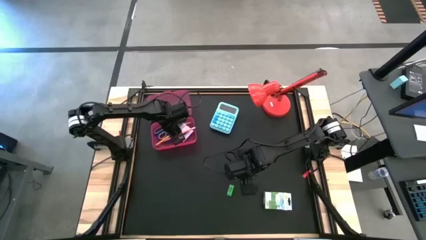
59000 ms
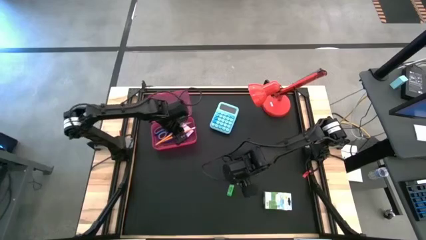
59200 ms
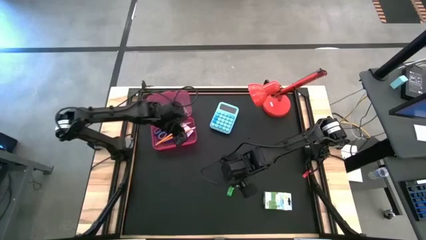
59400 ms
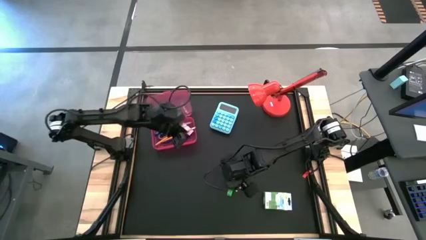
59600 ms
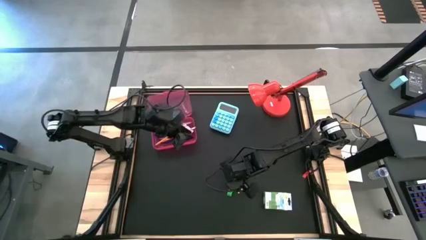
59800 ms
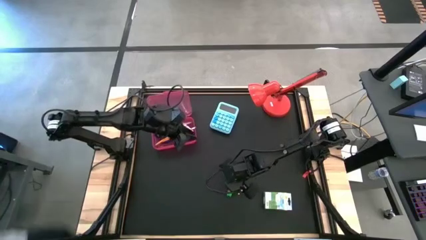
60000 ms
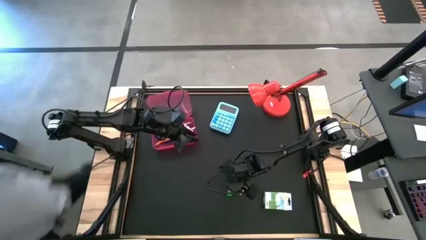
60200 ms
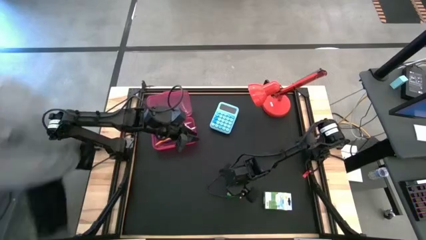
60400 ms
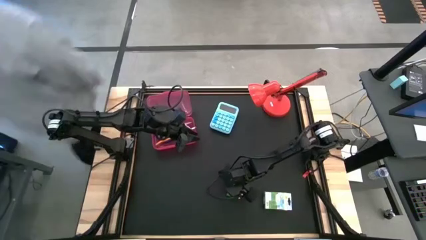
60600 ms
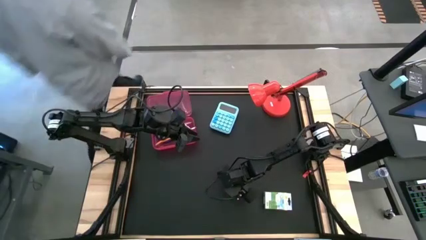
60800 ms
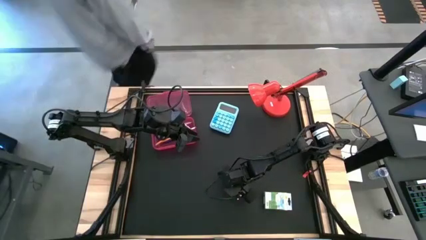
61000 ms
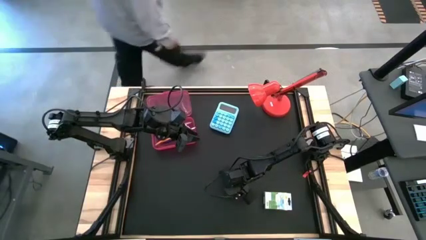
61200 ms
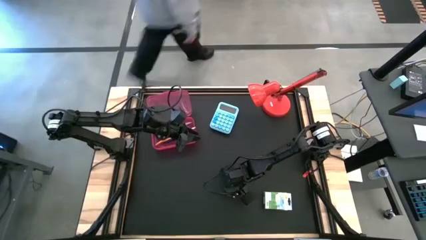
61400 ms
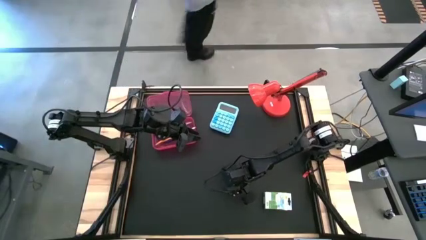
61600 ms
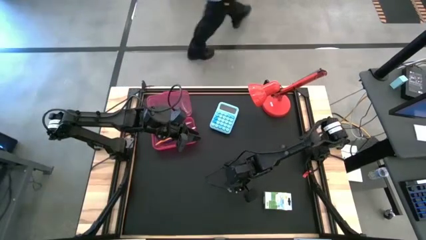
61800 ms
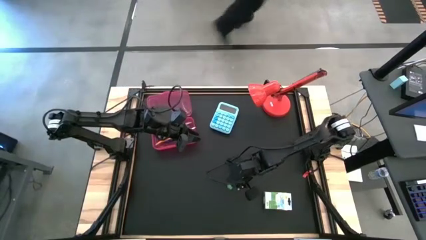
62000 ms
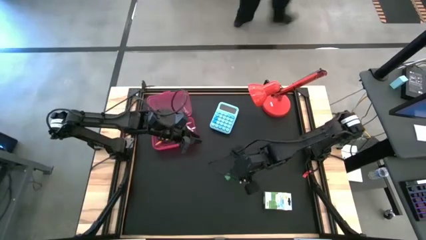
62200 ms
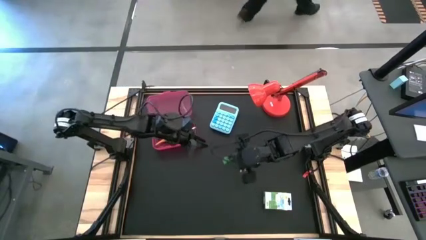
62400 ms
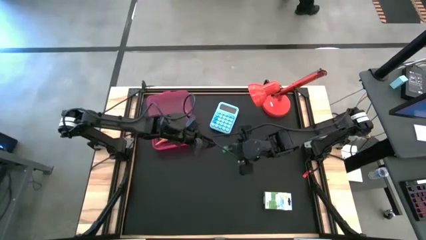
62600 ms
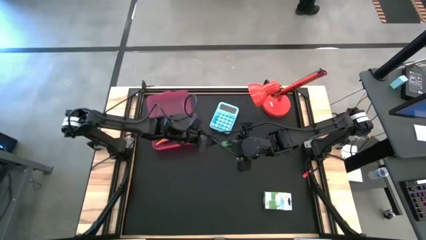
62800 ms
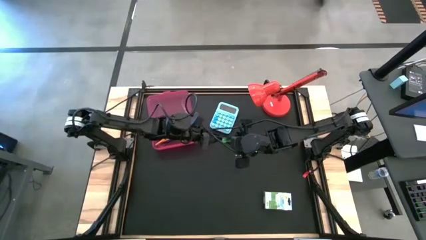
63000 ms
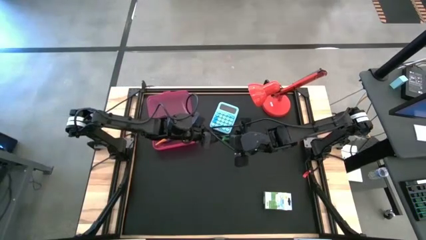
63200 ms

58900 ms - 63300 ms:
Task: Pack school essentials
Put the green eraser into the pink supply box

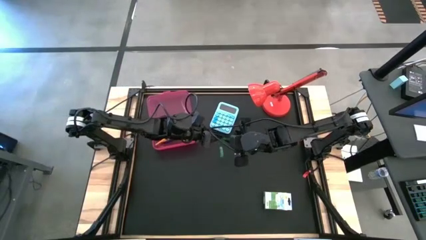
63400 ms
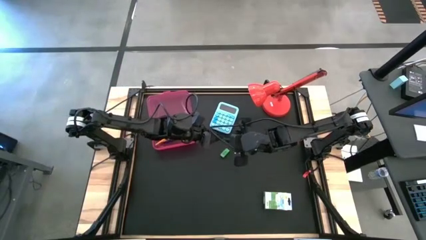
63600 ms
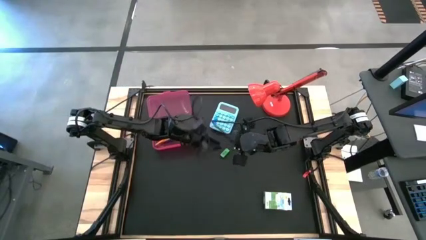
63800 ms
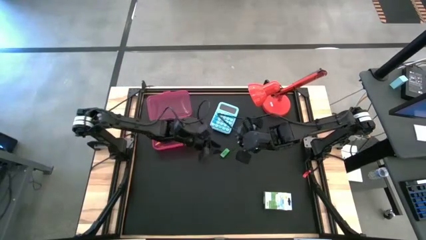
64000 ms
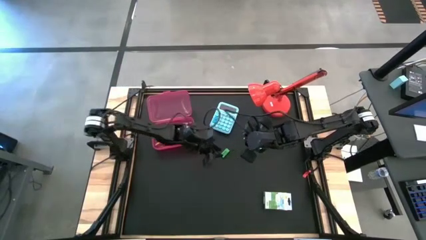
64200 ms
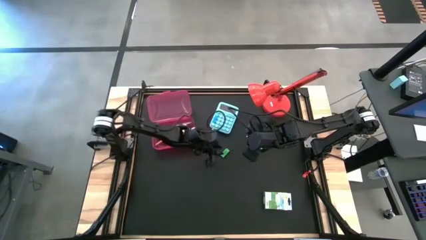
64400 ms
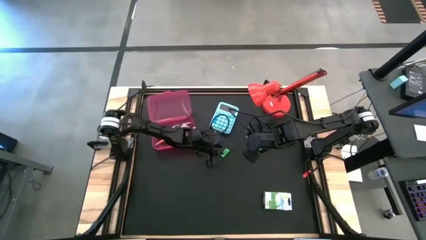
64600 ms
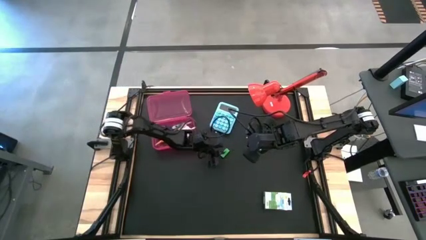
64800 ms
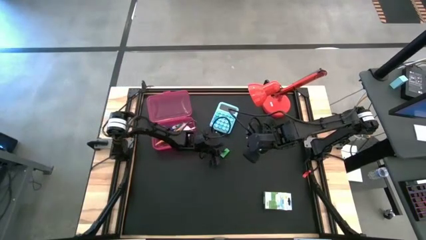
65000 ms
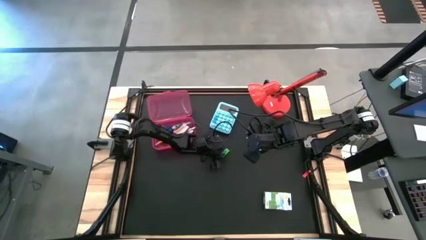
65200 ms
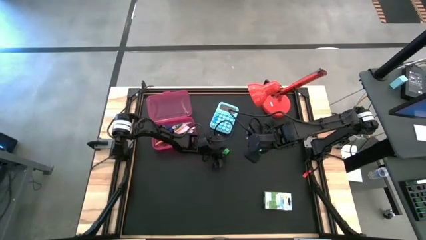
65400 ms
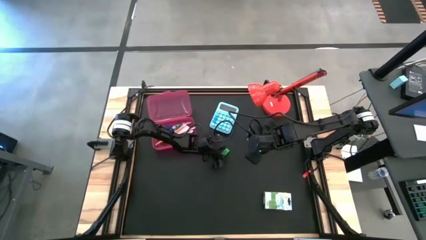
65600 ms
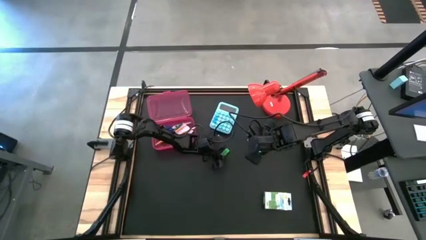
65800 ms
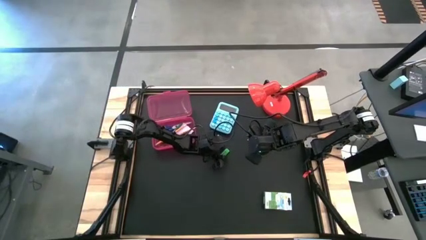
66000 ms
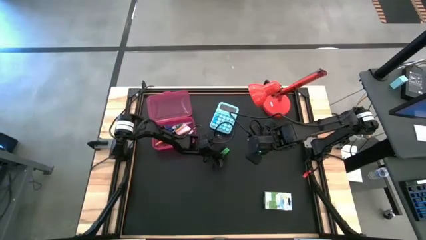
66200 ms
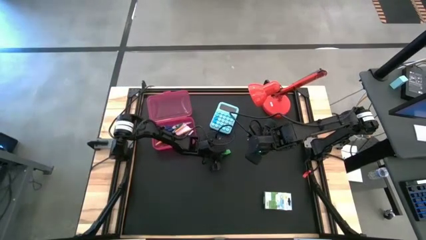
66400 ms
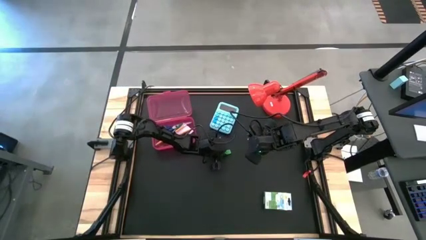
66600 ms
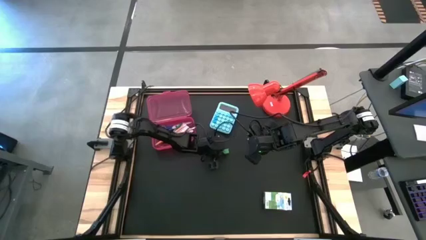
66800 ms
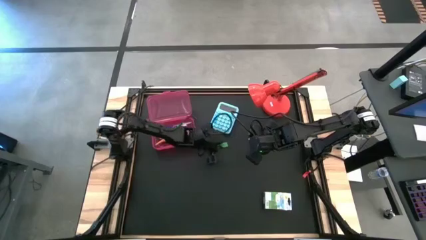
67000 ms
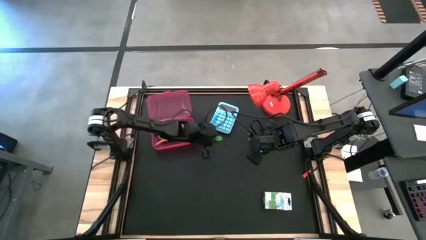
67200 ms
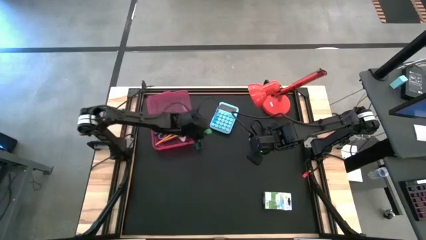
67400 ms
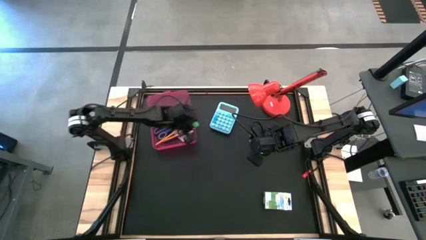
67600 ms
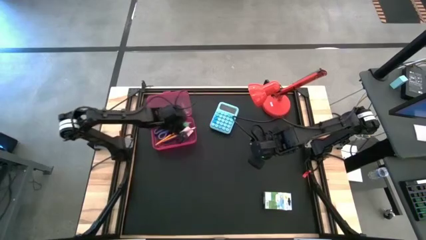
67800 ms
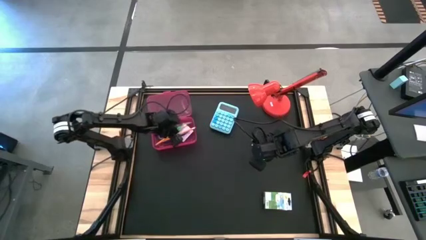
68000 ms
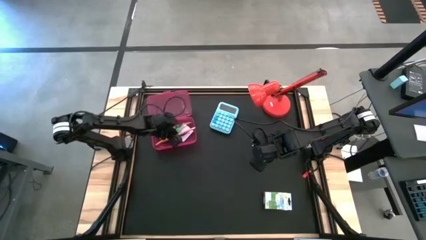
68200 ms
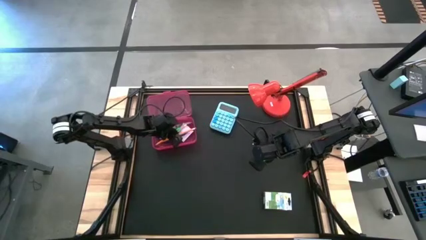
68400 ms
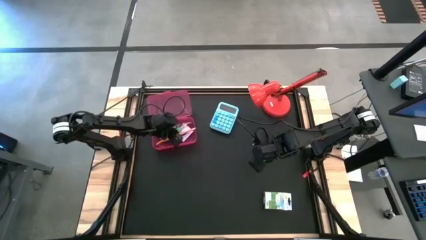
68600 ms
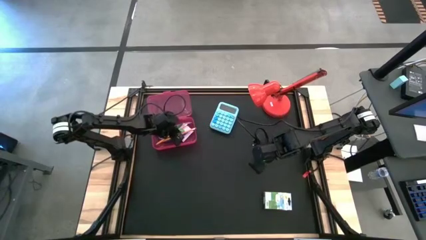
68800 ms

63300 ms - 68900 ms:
Put the green eraser into the pink supply box

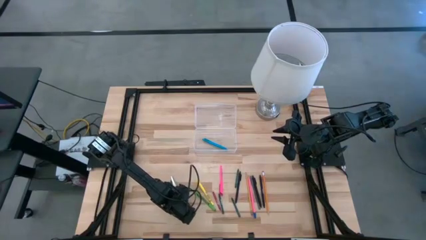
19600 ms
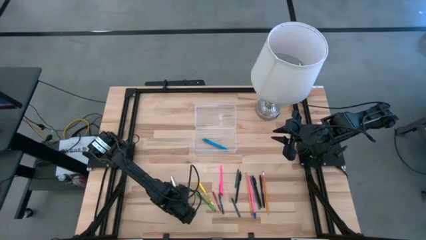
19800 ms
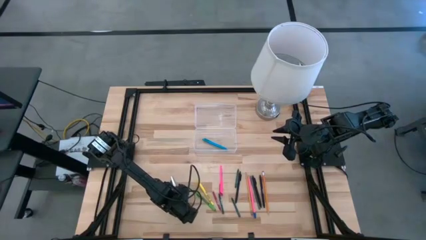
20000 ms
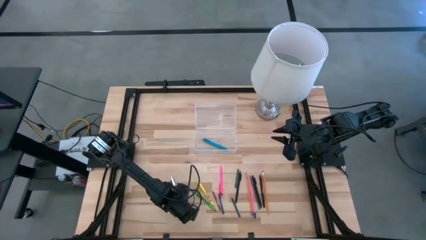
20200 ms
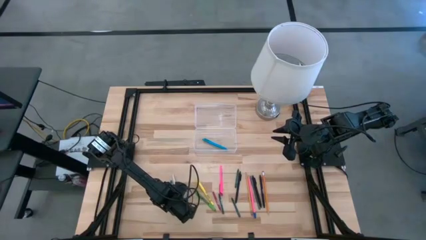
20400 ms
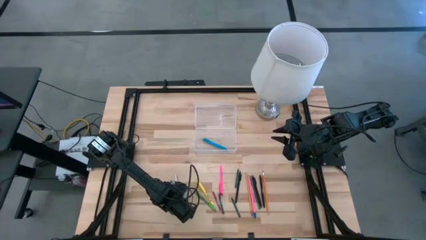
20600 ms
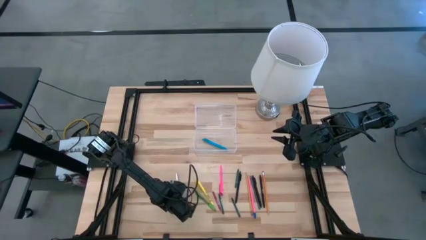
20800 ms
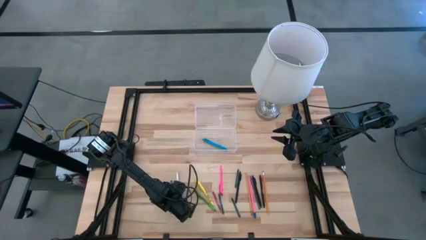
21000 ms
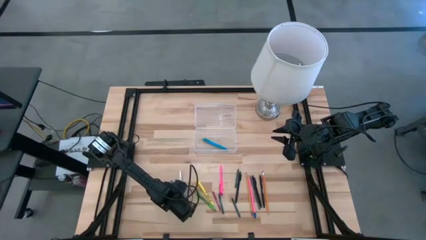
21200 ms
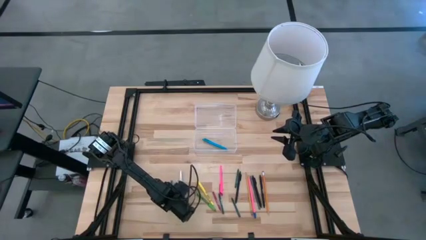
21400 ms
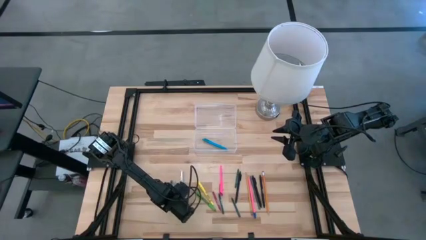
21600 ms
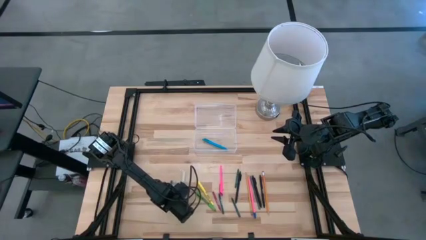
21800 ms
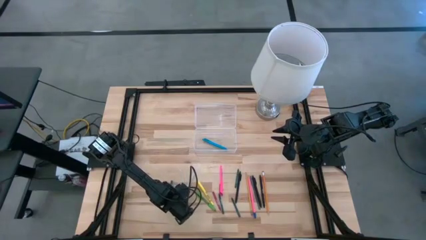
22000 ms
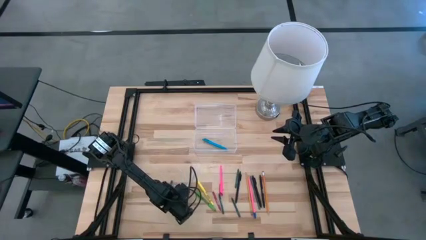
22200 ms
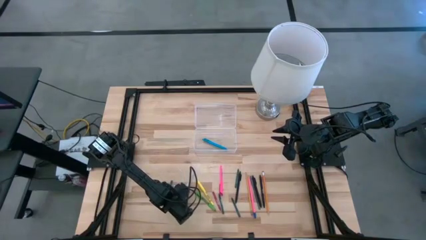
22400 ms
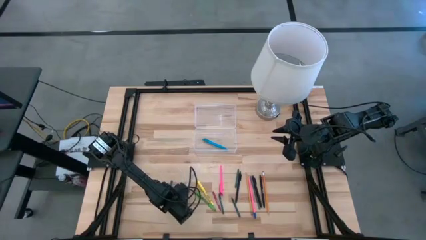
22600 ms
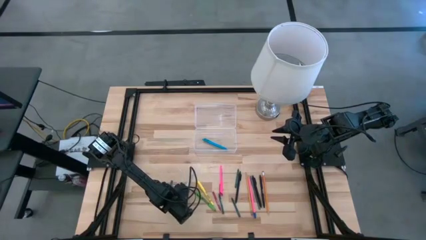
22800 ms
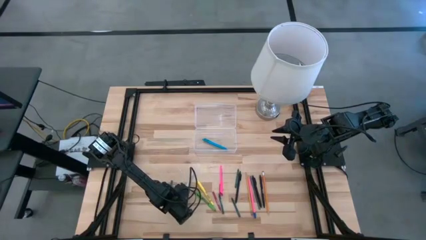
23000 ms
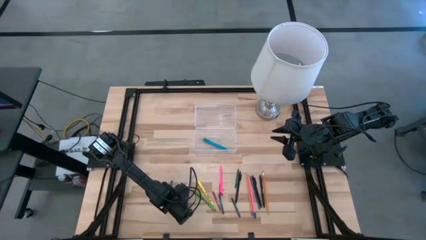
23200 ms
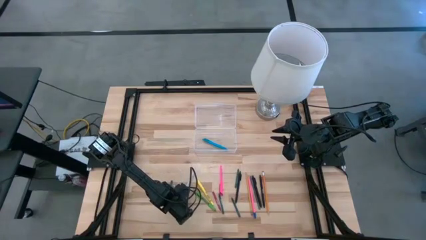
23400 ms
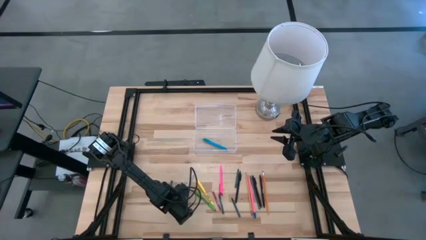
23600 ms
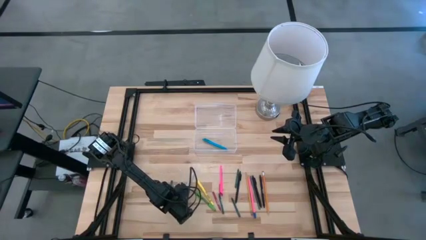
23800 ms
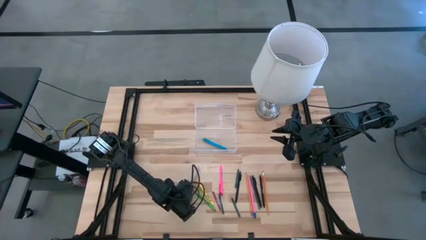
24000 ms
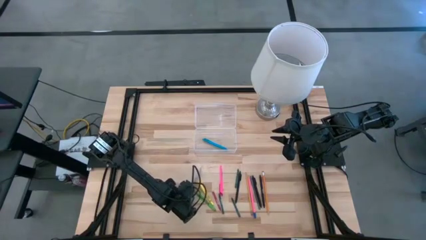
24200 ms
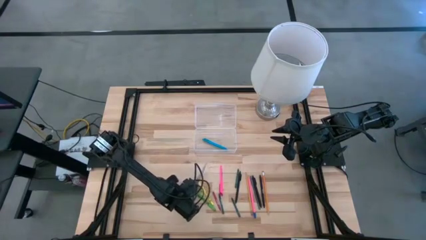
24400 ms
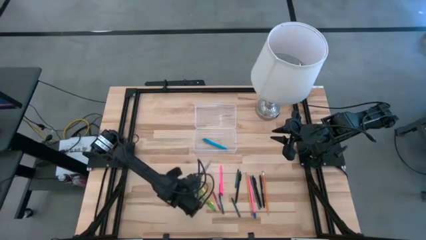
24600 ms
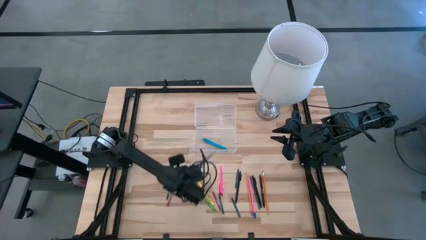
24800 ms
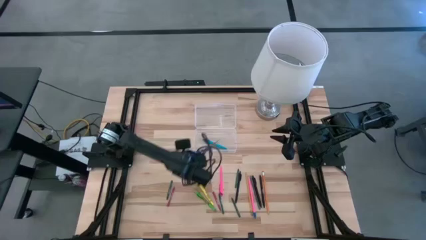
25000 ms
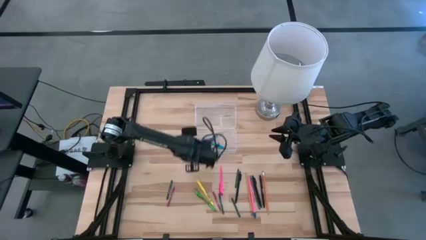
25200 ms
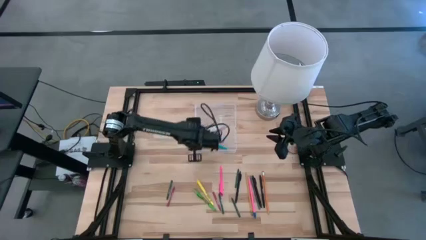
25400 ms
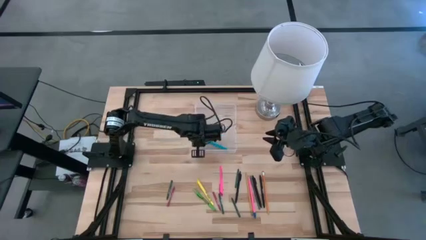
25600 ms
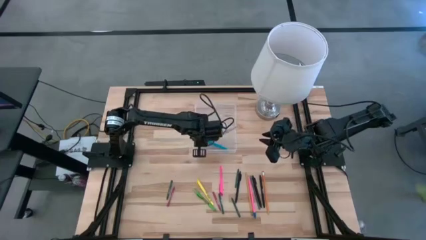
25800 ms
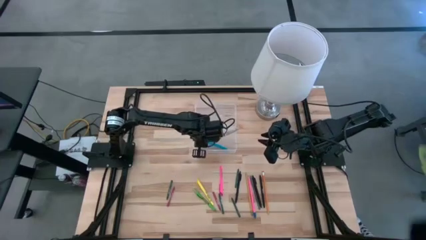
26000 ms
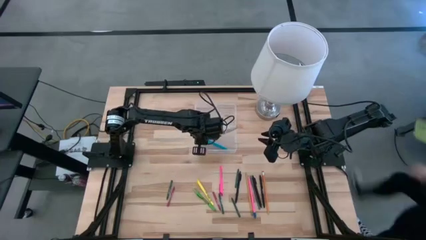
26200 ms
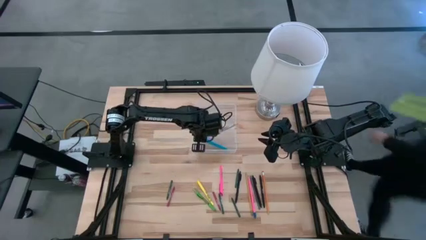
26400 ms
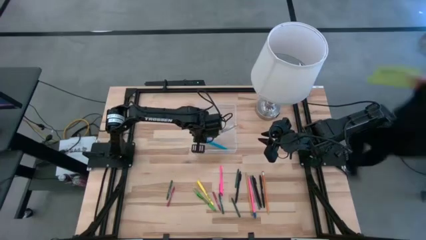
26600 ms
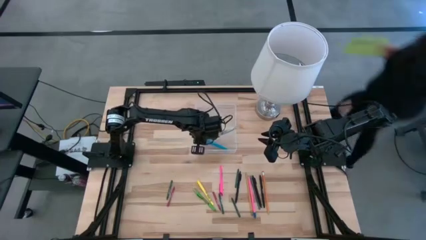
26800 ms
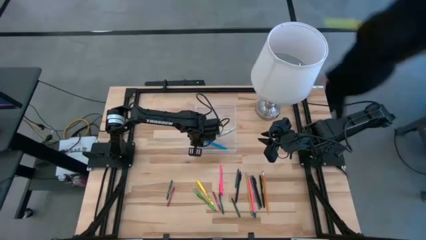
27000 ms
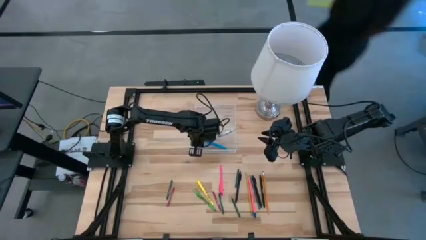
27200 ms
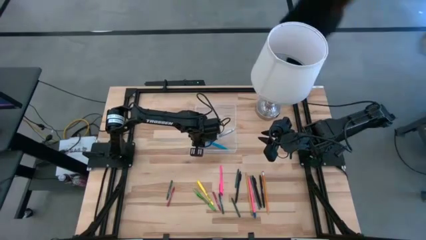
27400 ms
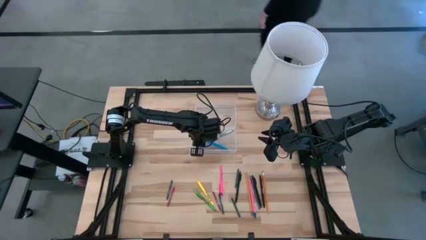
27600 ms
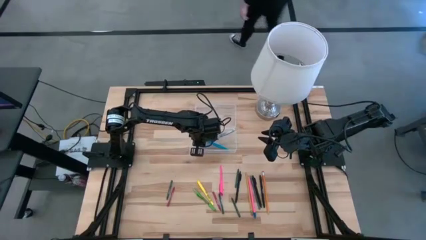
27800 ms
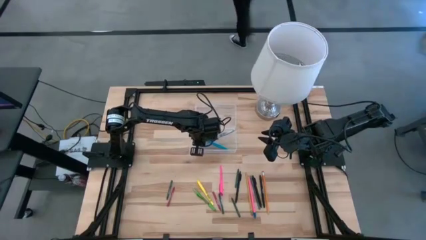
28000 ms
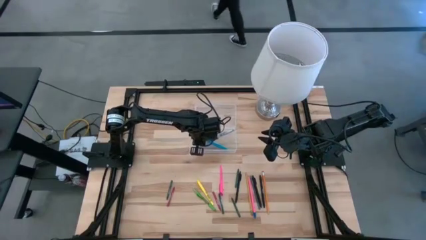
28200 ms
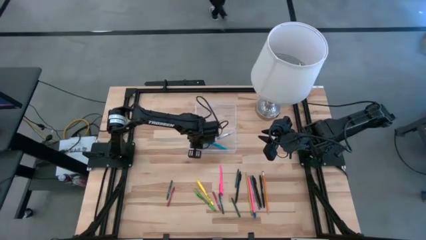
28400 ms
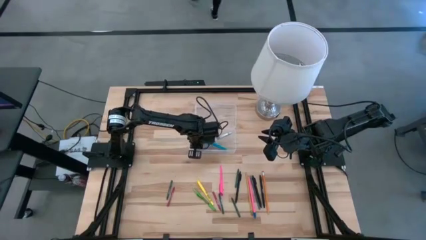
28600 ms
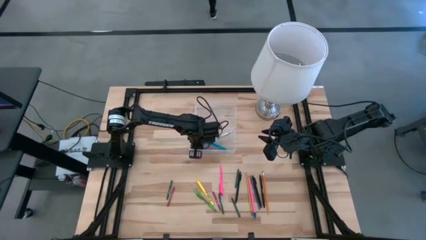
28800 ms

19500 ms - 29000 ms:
Task: Pick & place school supplies into a supply box
Put the blue scissor into the transparent supply box
